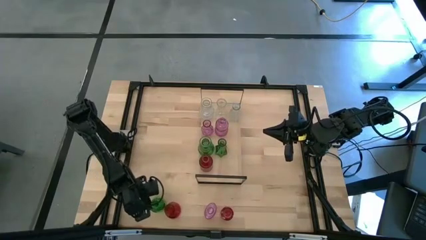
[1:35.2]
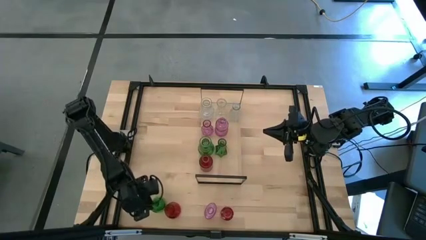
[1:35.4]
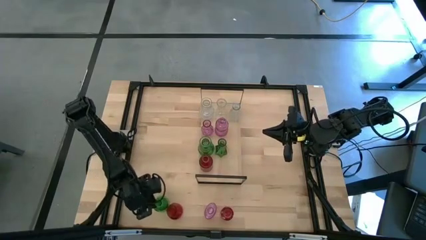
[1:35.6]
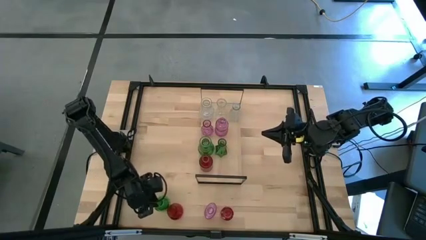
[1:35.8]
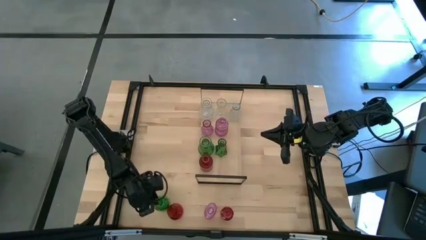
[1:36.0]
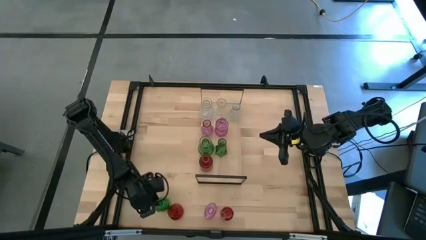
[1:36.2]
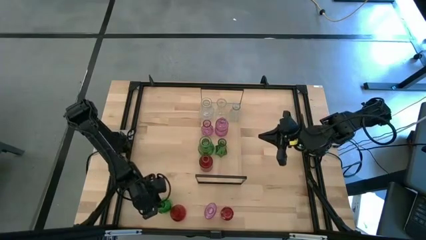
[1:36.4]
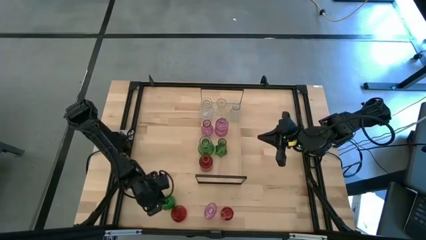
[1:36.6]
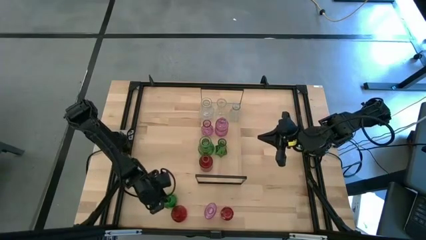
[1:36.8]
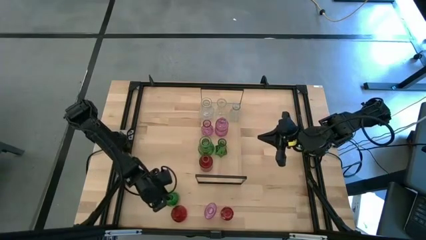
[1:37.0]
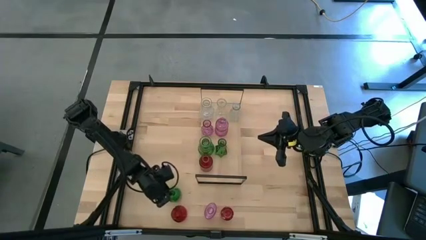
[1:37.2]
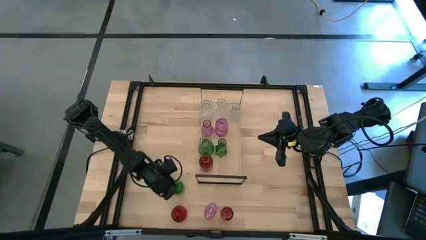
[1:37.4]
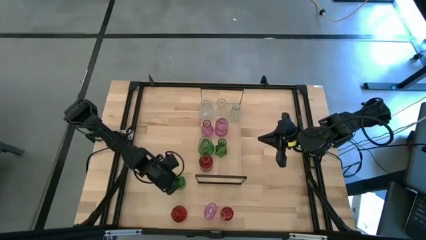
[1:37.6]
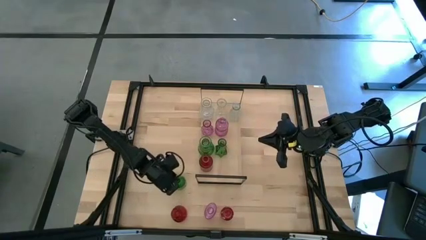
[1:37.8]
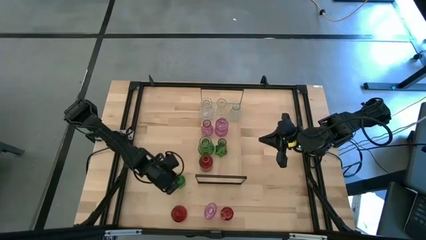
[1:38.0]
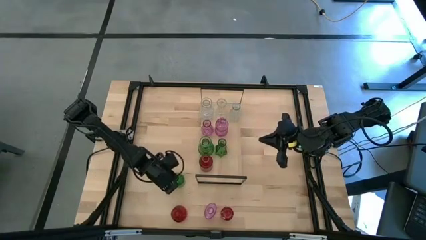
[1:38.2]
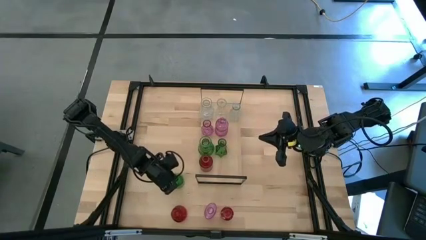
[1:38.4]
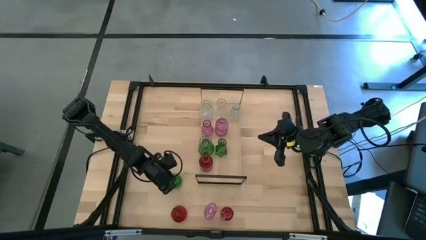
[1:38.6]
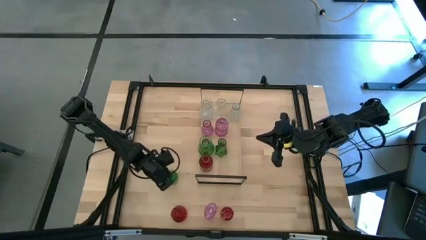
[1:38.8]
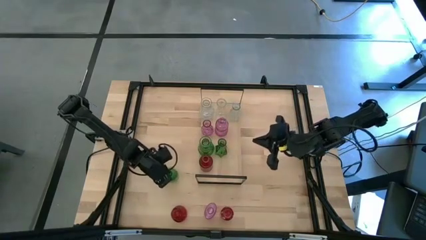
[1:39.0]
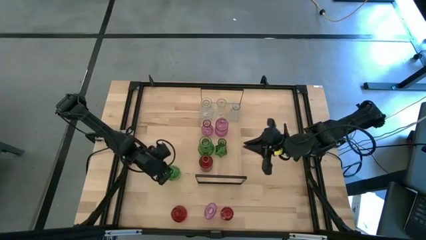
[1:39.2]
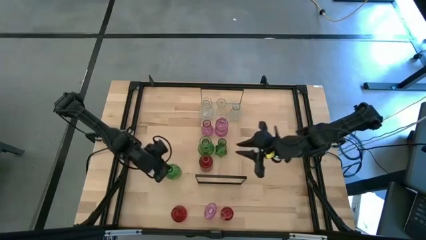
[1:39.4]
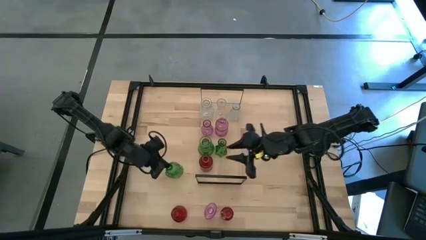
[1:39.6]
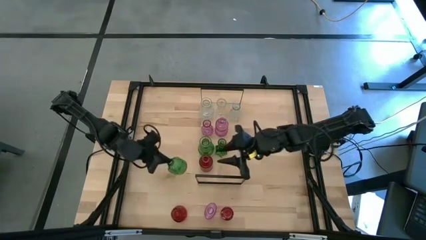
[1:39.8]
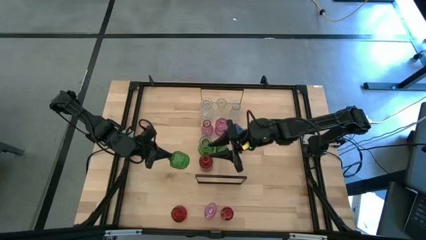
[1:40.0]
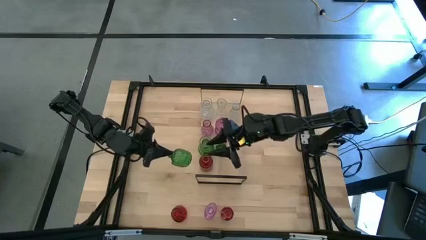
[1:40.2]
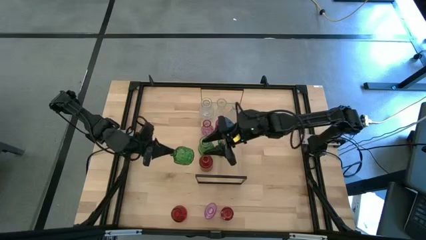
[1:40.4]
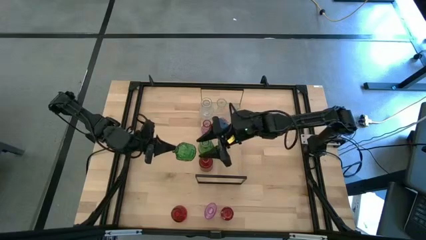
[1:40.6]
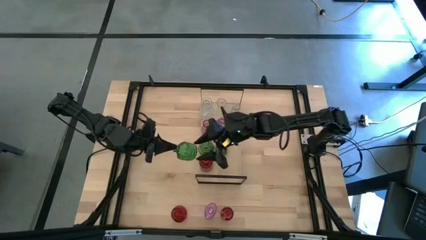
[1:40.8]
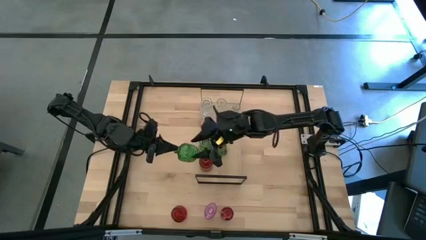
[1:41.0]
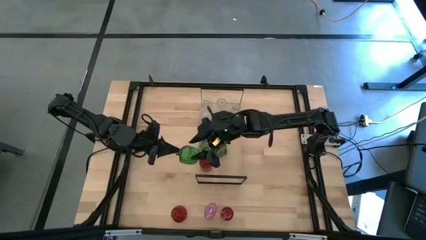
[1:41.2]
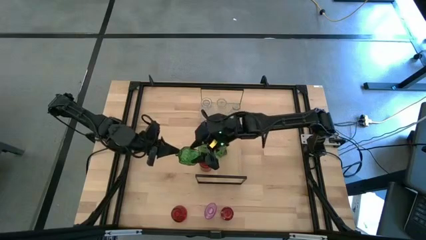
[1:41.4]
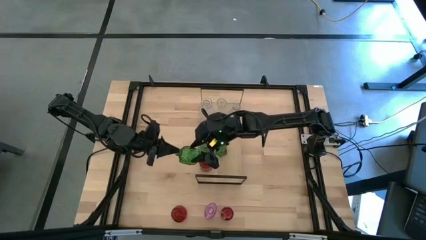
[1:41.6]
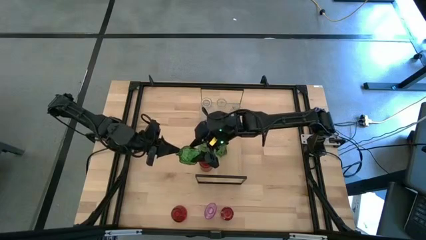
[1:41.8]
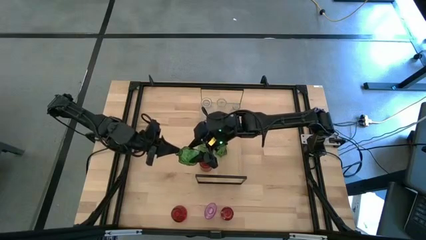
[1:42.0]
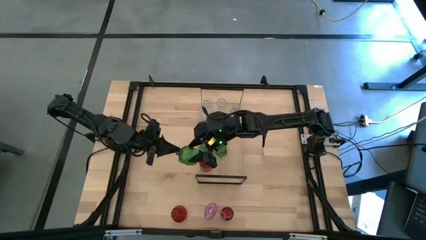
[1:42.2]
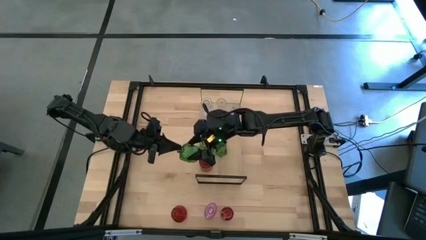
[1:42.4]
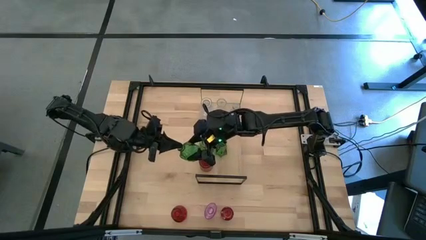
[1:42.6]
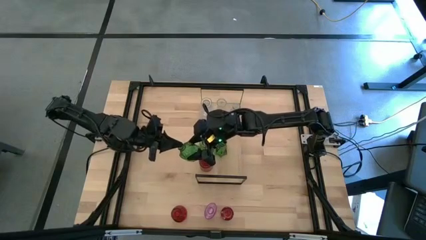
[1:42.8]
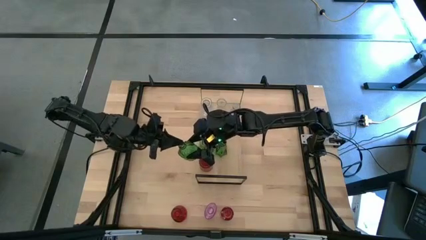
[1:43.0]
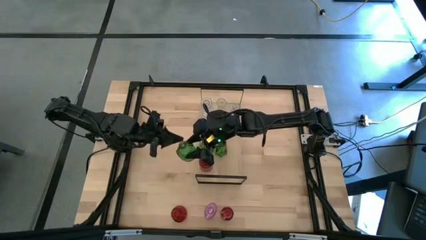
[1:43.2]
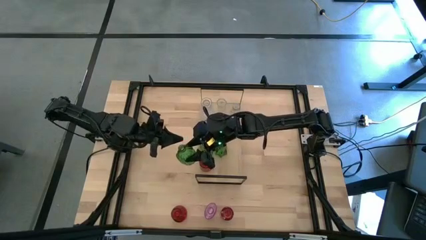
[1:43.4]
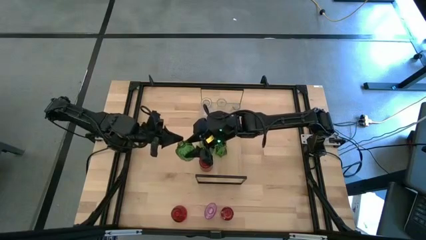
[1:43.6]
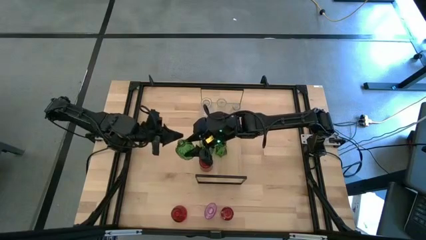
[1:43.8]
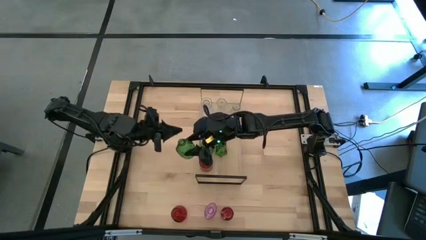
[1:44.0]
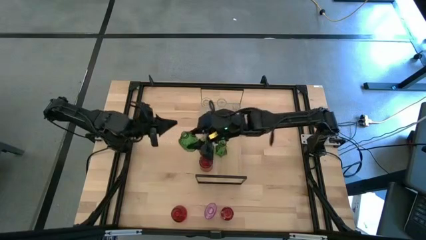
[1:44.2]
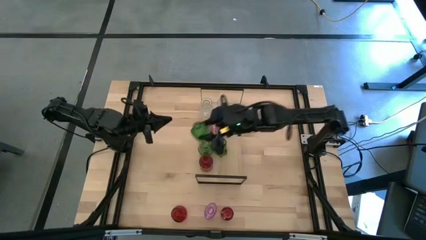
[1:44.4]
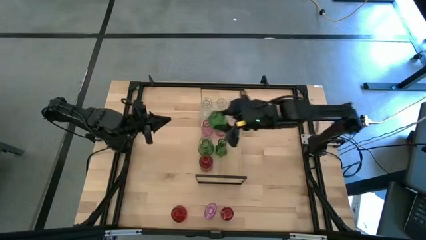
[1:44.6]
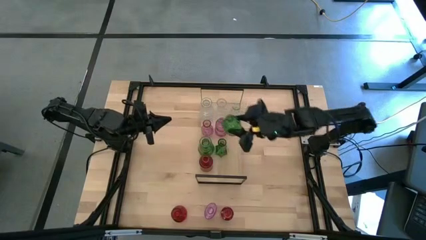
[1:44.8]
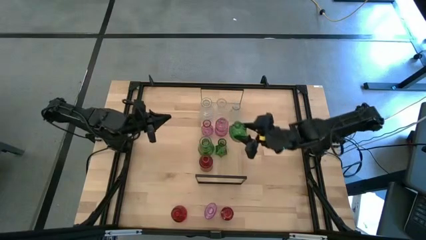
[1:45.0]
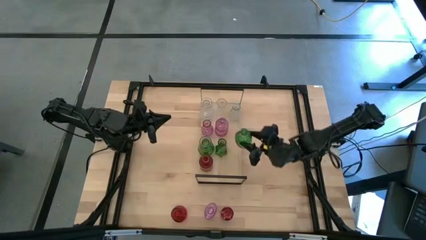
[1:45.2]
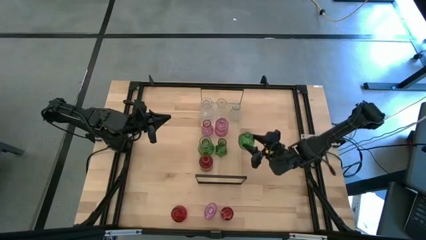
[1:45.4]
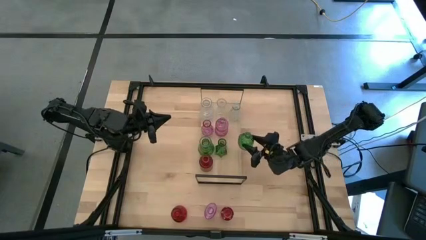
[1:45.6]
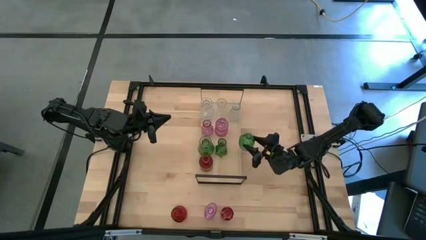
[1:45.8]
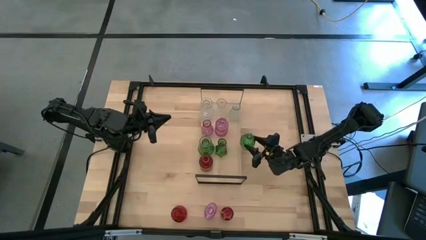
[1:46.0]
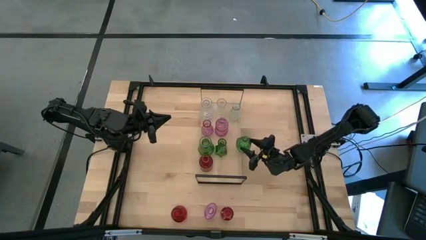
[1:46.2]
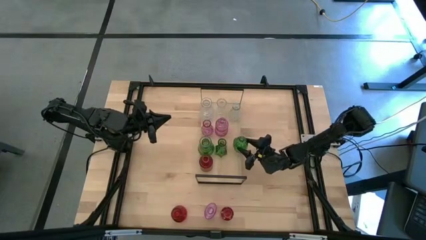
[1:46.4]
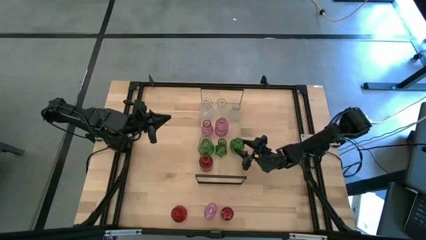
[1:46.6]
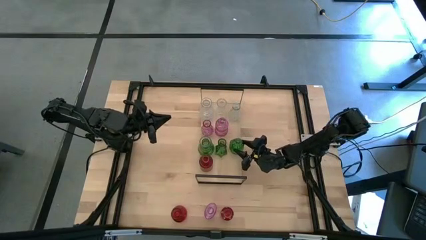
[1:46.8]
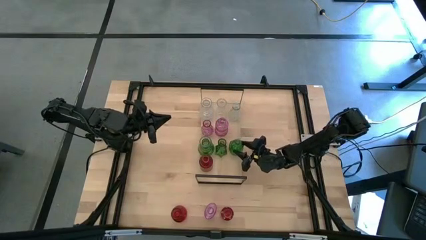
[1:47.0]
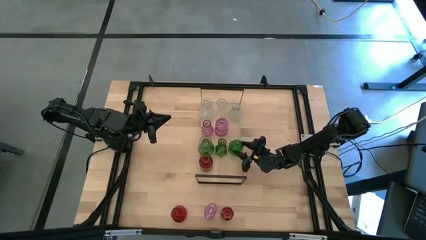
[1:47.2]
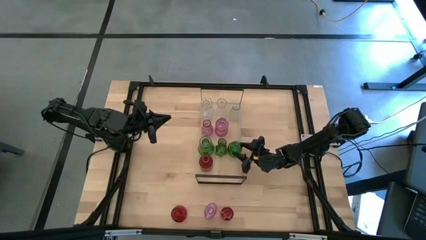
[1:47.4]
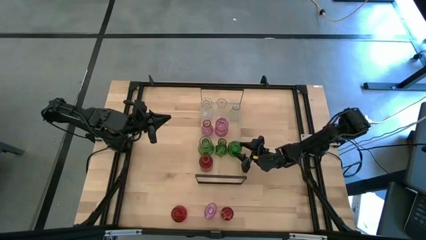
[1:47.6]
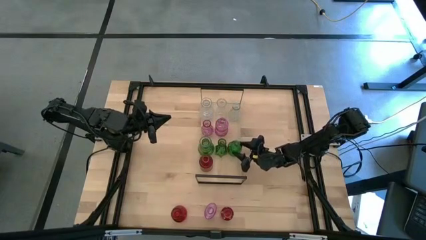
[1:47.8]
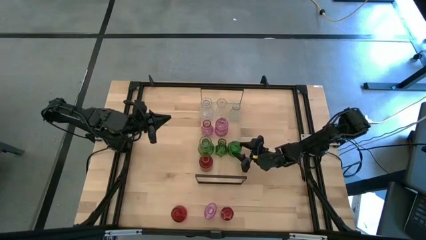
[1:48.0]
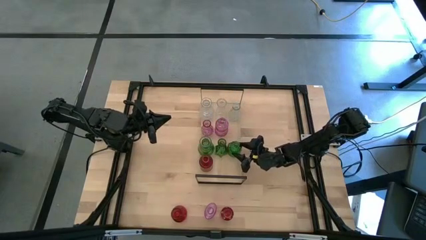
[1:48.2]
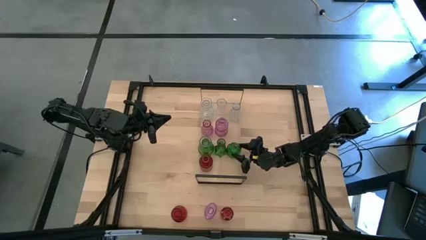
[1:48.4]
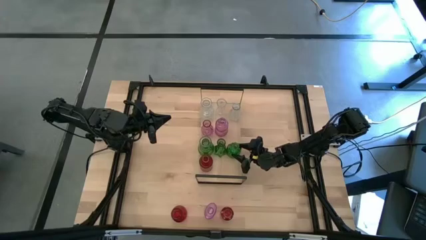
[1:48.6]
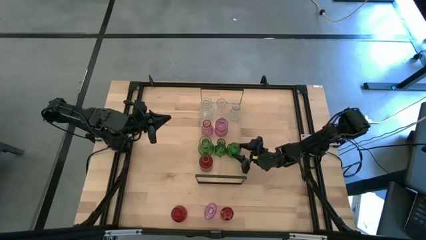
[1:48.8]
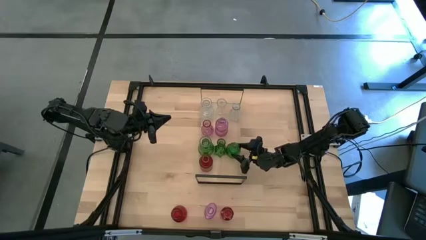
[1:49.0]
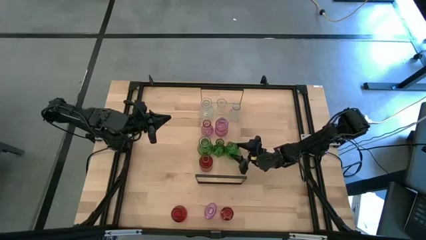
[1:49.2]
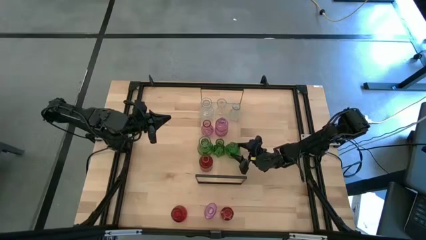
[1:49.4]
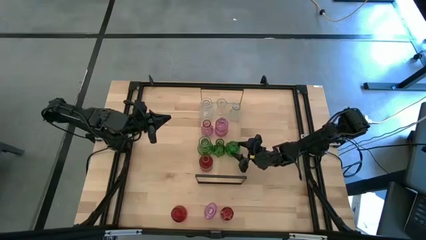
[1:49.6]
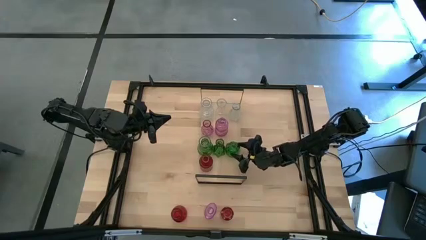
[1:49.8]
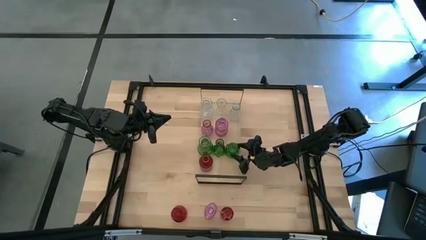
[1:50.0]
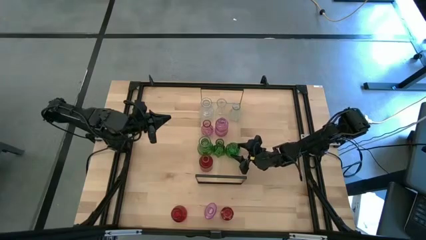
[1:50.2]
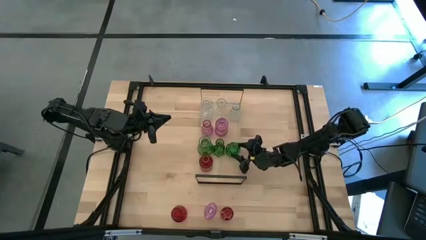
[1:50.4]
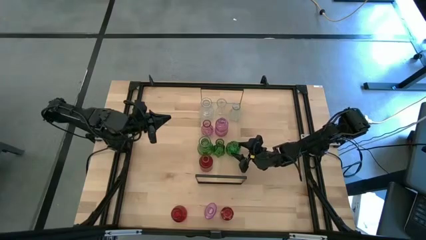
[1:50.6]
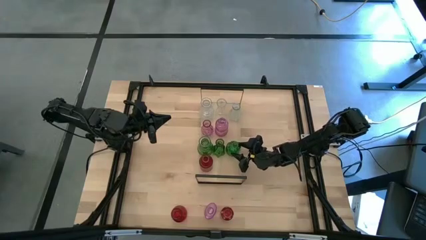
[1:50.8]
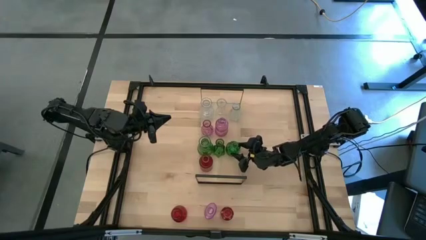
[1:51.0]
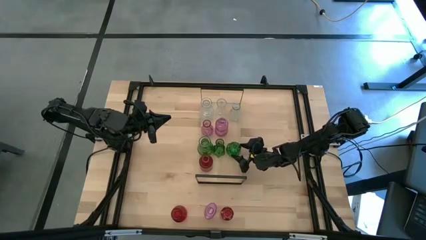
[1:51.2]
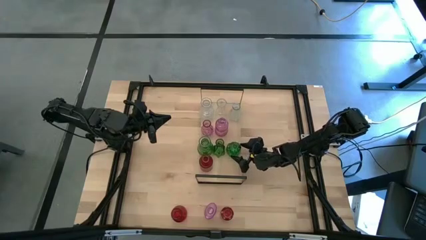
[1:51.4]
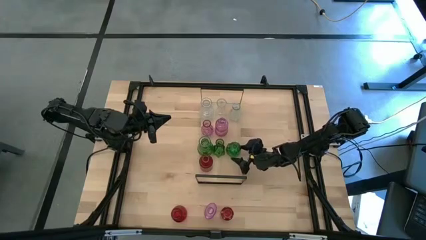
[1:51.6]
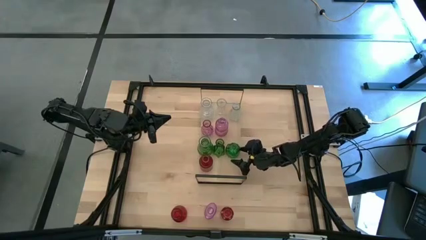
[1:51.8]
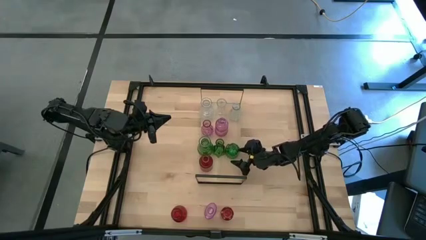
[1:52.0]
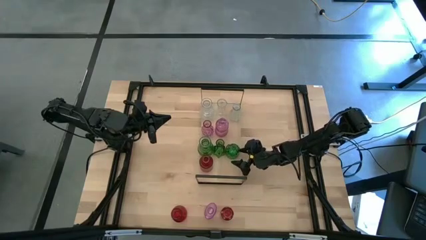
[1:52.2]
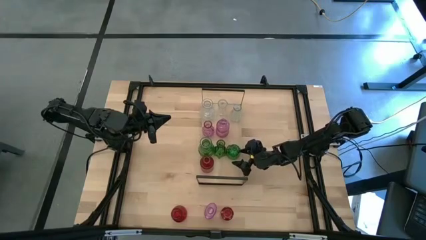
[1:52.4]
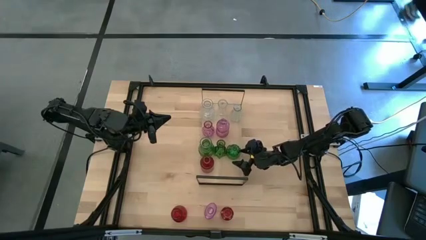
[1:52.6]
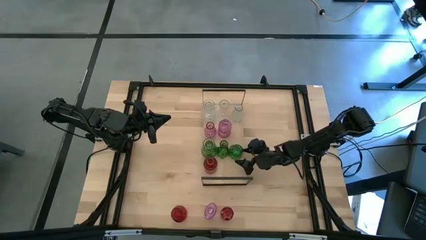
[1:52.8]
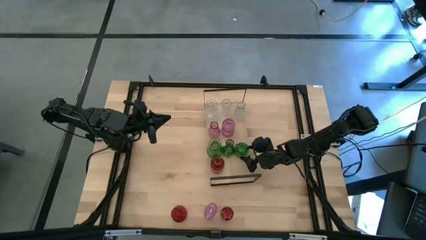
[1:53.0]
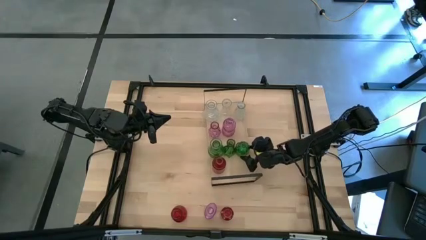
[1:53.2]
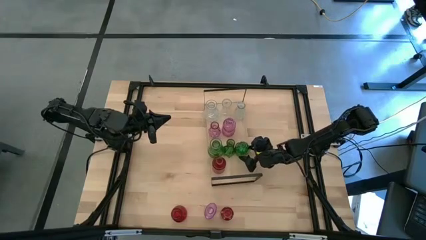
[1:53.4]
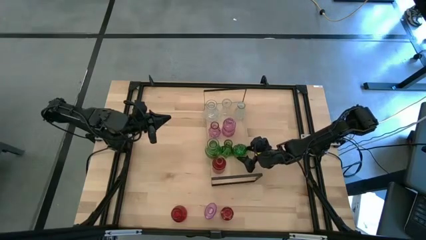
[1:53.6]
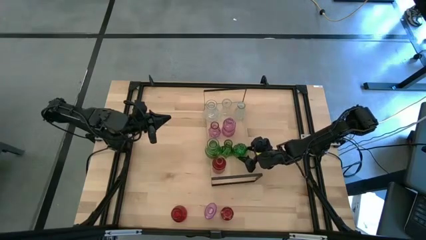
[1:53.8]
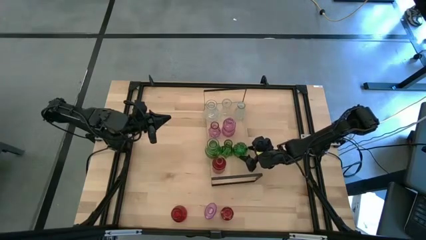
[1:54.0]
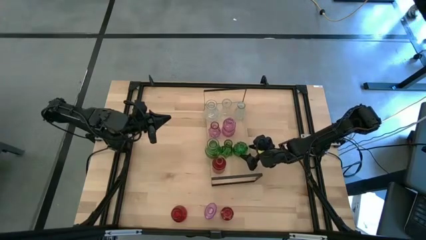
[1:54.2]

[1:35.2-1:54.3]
Task: sort vases onto shelf
Put the green vase on the shelf aligned with the other green vases
